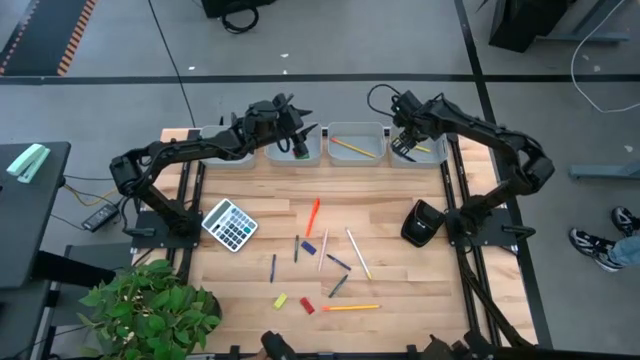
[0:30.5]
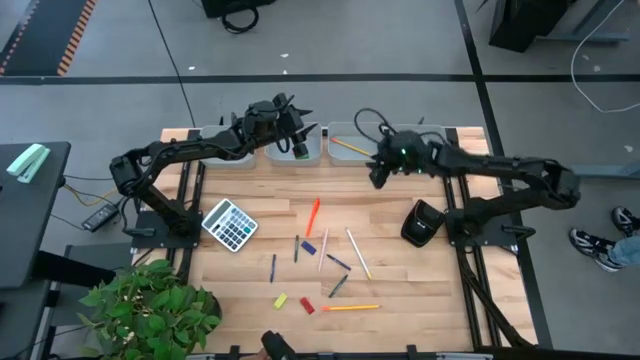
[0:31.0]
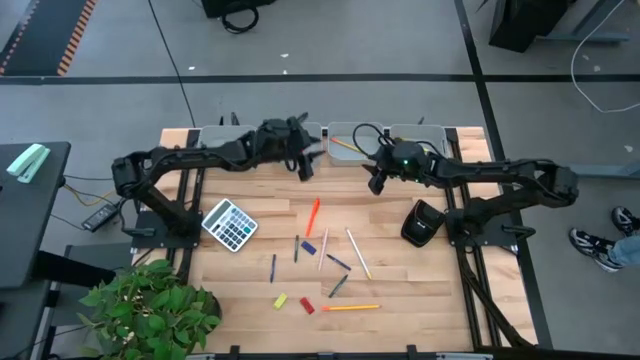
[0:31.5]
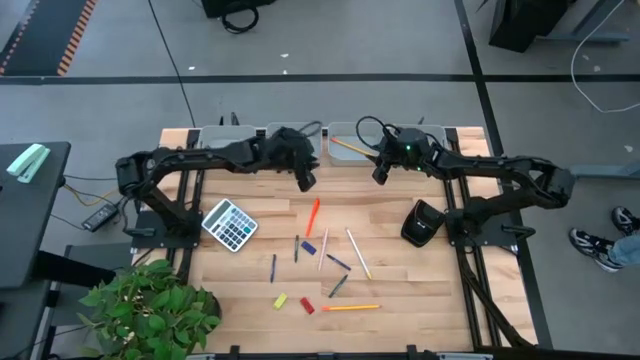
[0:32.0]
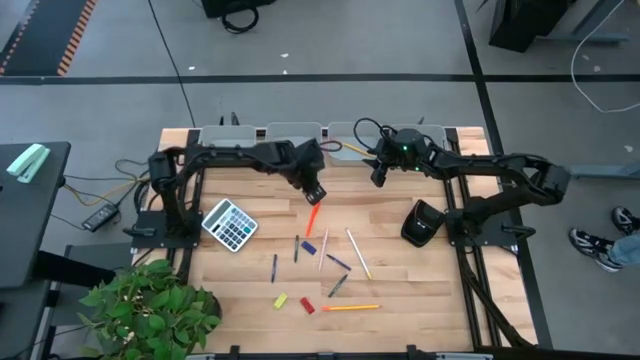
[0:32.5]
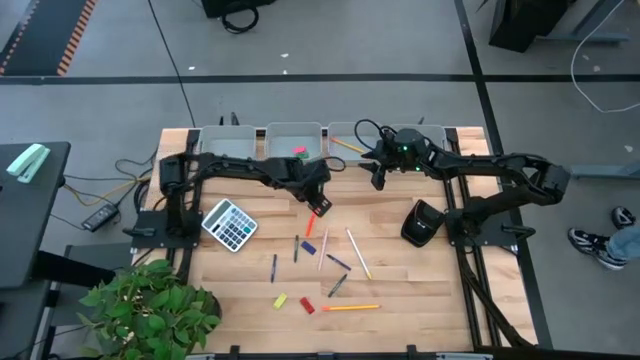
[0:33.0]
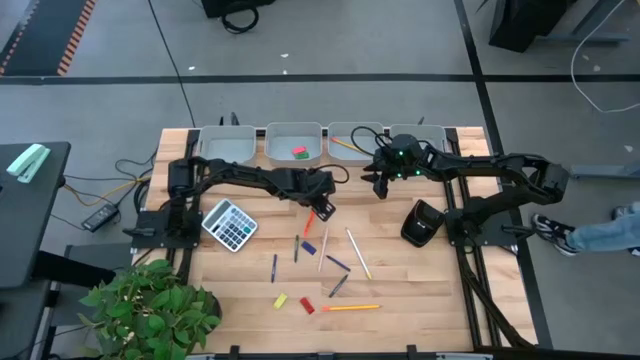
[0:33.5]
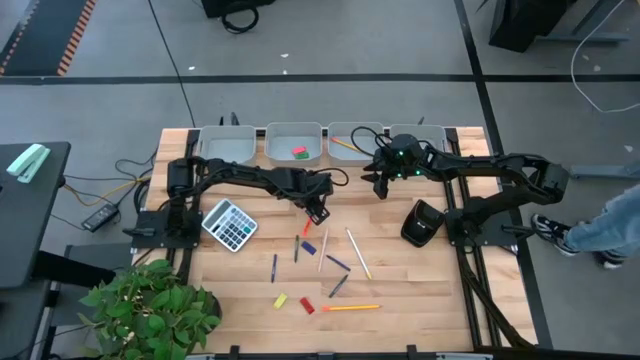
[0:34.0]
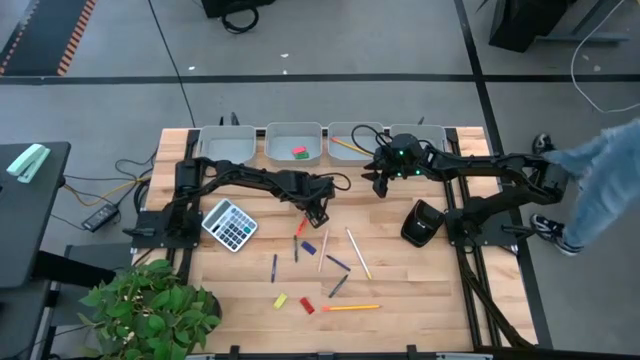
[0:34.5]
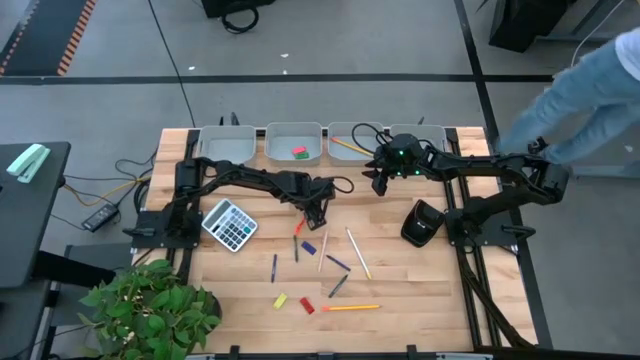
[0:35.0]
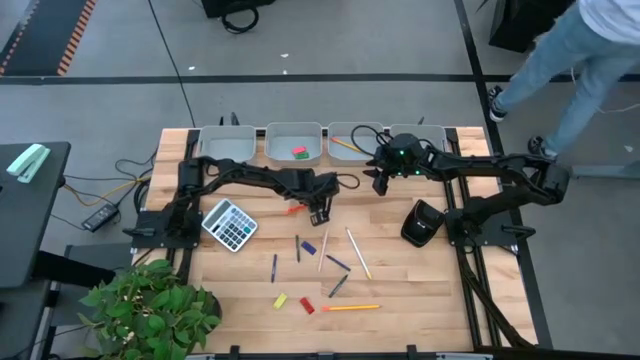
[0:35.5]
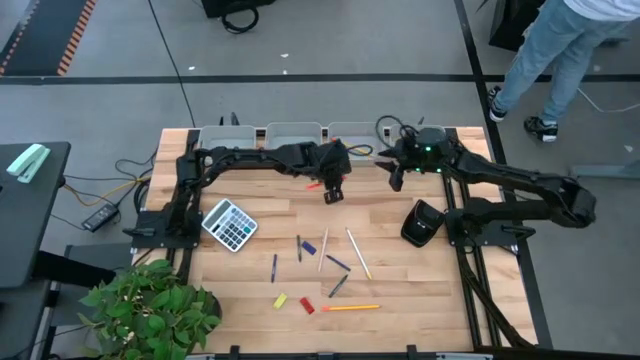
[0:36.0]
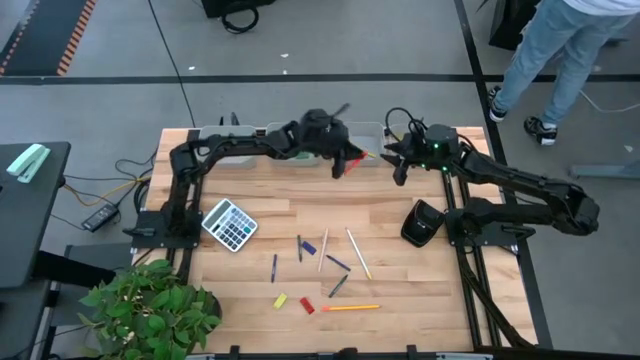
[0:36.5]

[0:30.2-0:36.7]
Task: Sort crayons/erasers/pens/pencils in bins
Put the orange pen into the gray bin

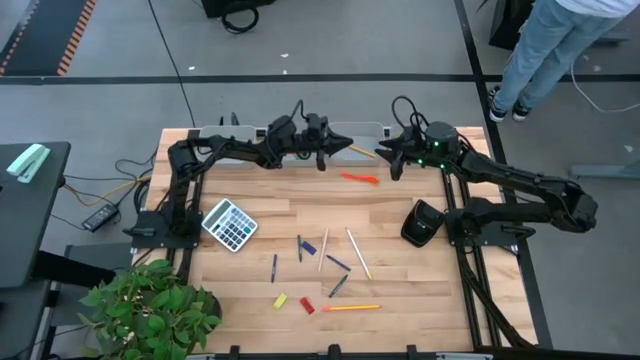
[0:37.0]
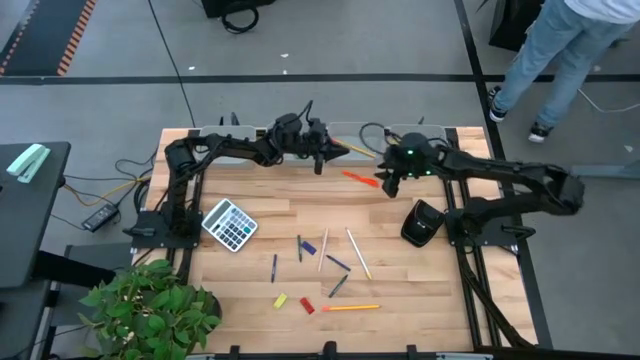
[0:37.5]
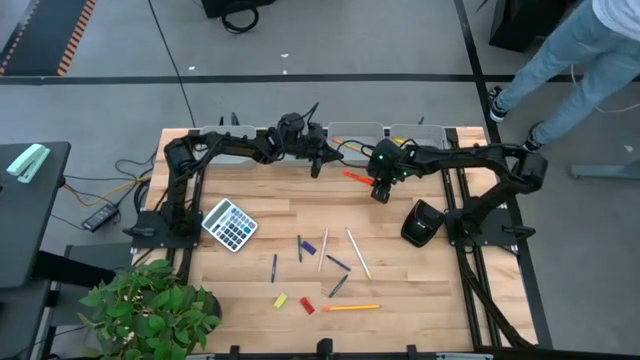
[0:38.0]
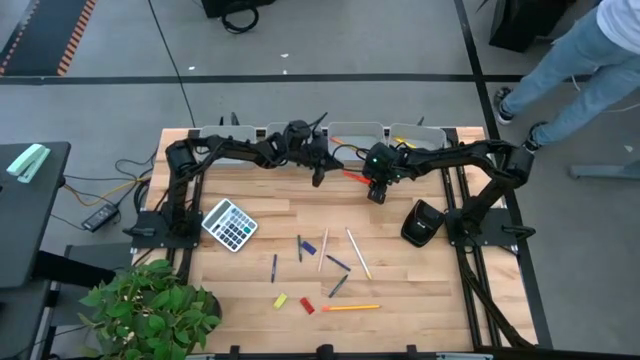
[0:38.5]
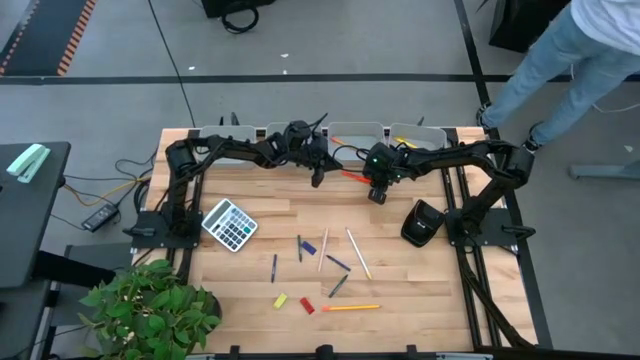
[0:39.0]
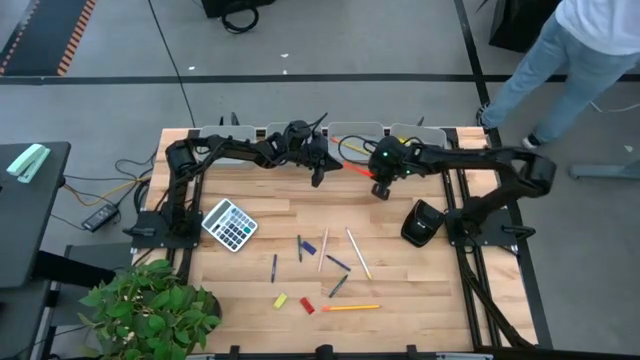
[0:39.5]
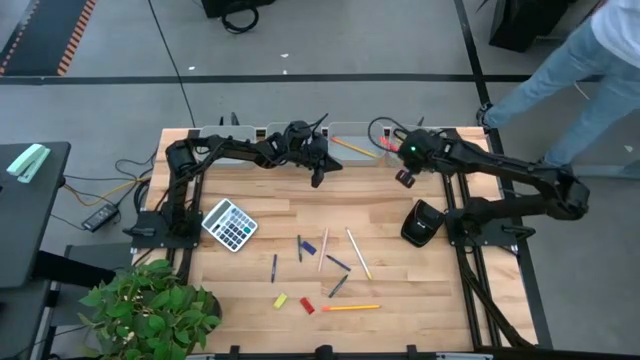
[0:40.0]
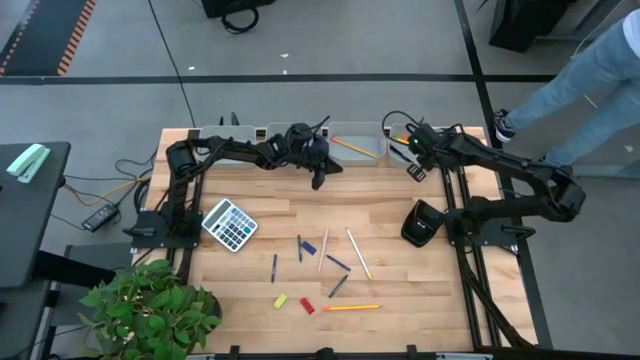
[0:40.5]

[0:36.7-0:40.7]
Put the orange pen into the gray bin

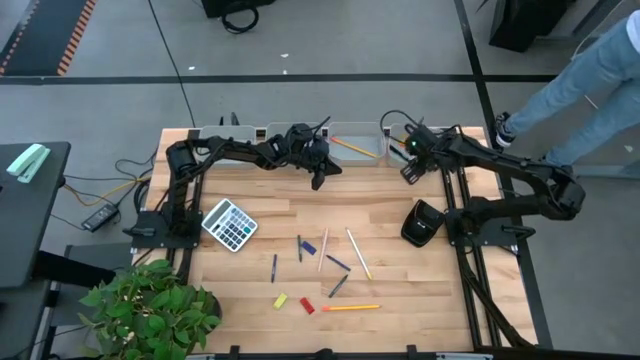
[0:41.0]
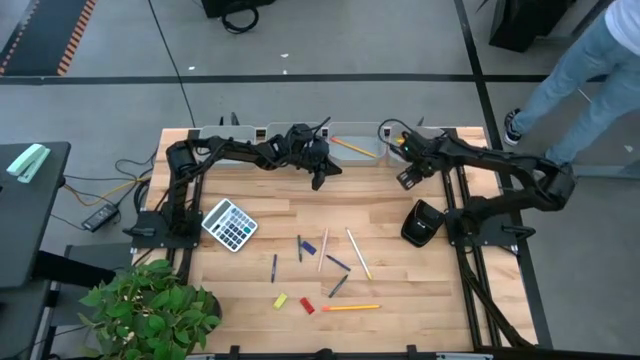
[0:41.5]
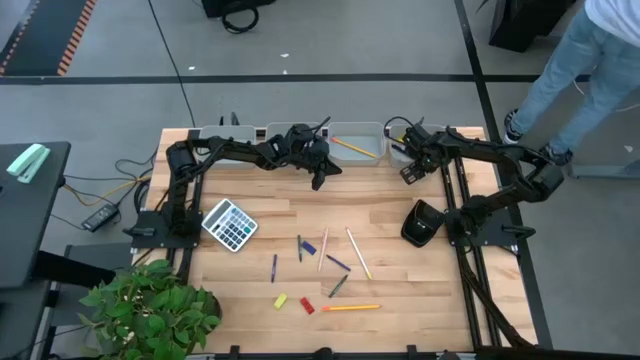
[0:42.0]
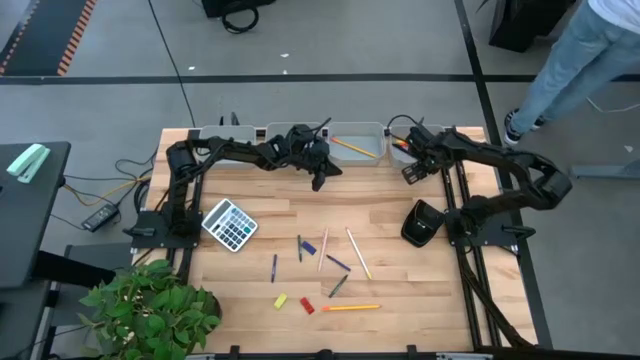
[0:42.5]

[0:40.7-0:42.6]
Adjust the gray bin

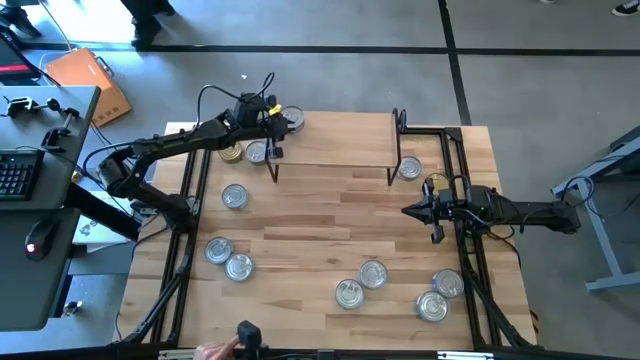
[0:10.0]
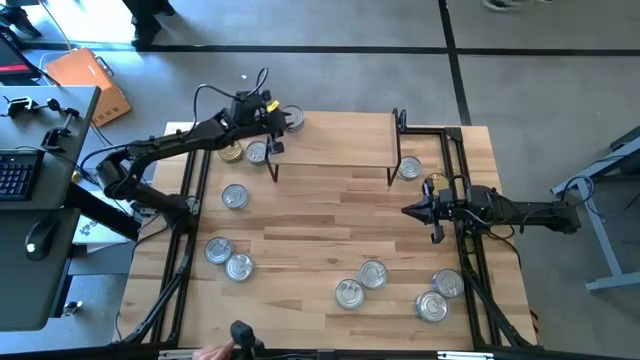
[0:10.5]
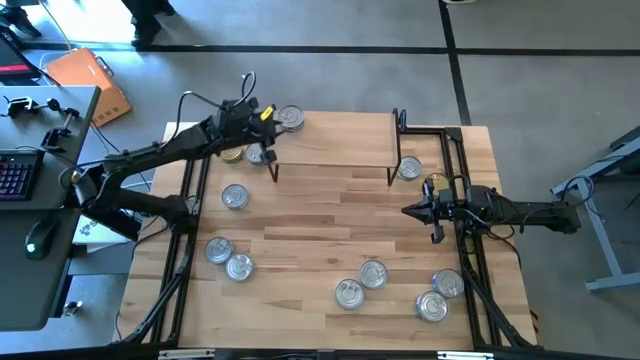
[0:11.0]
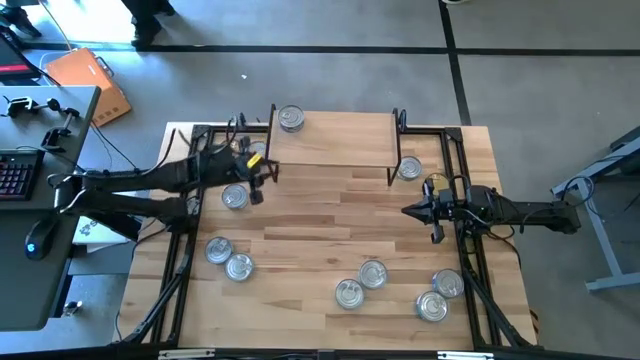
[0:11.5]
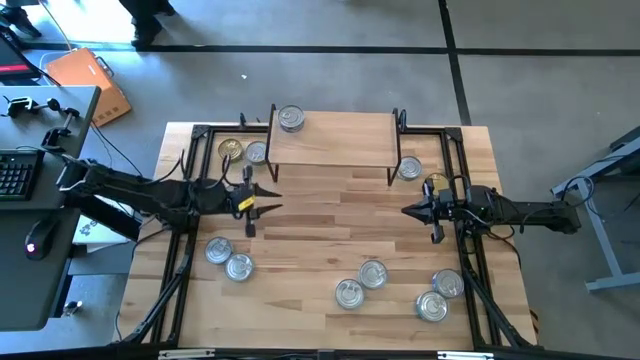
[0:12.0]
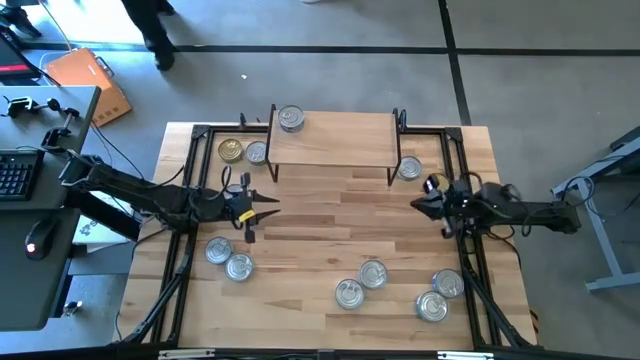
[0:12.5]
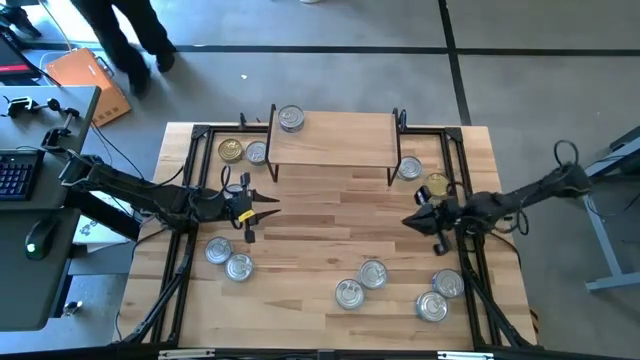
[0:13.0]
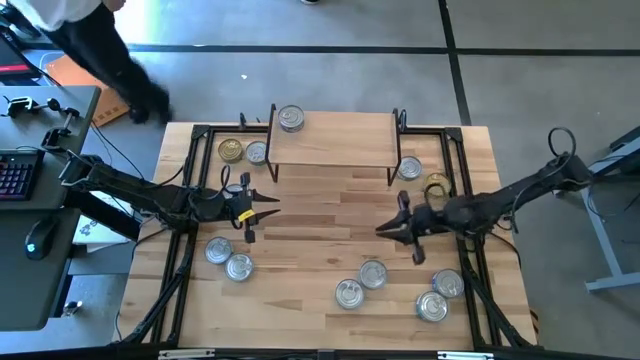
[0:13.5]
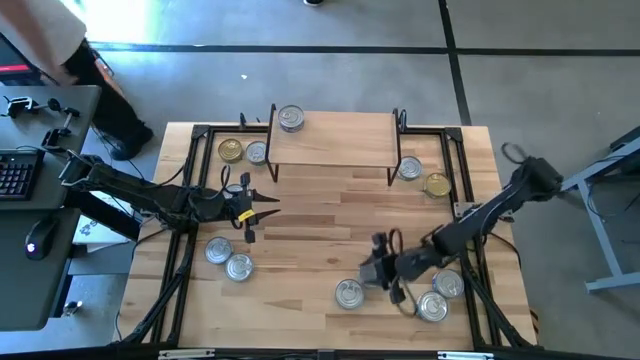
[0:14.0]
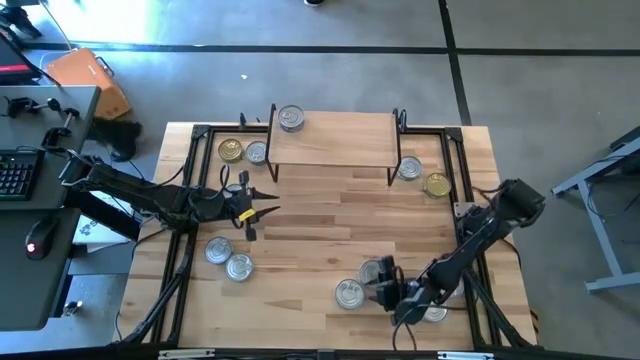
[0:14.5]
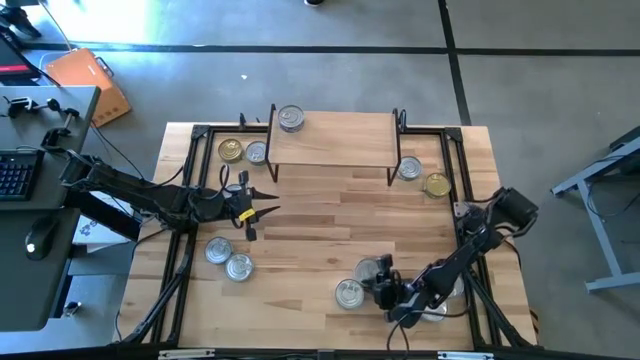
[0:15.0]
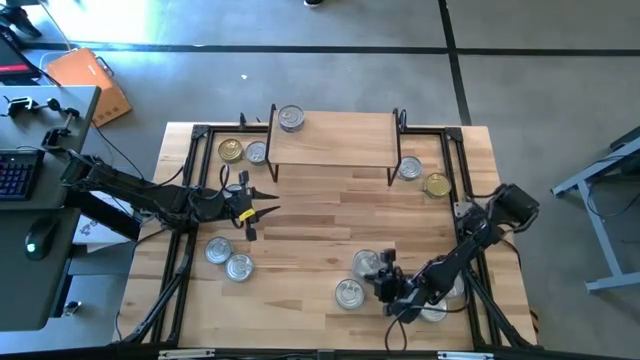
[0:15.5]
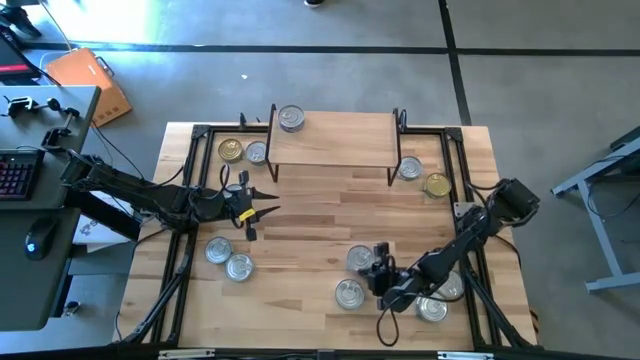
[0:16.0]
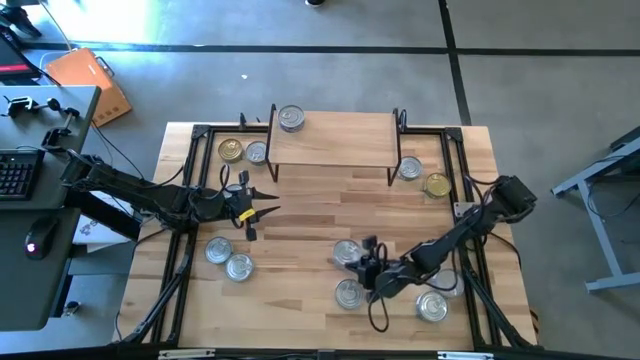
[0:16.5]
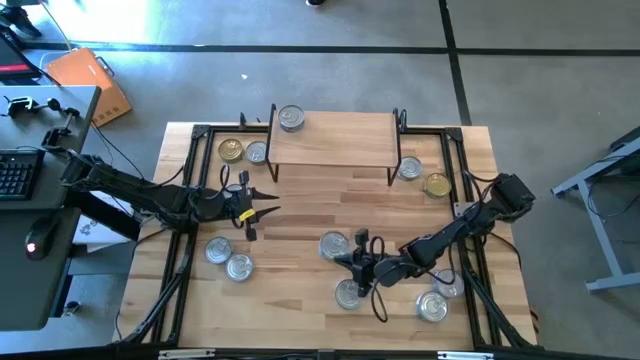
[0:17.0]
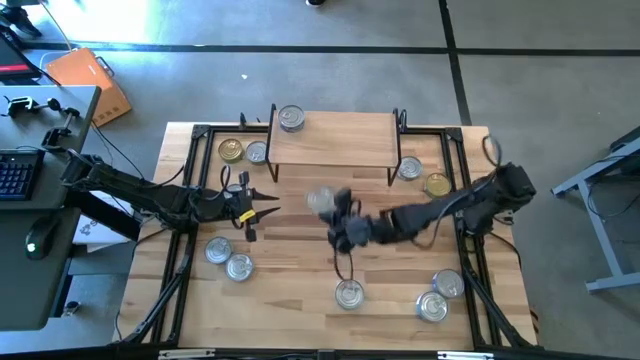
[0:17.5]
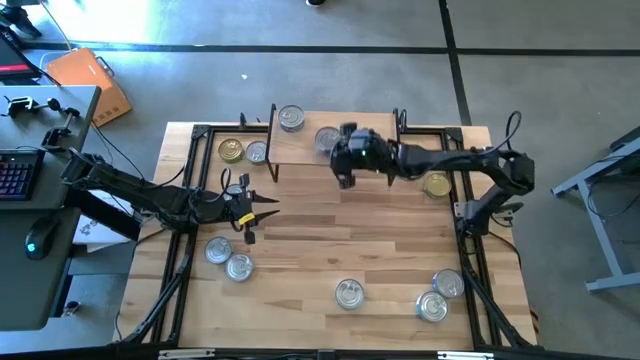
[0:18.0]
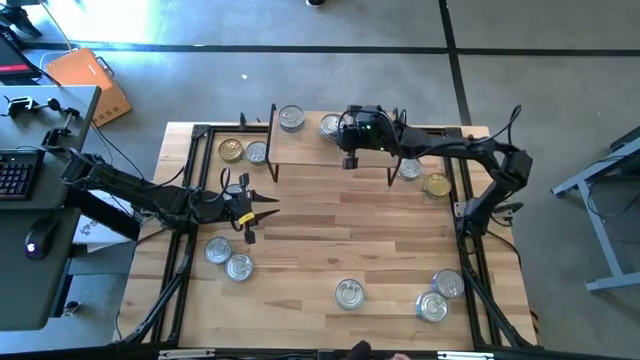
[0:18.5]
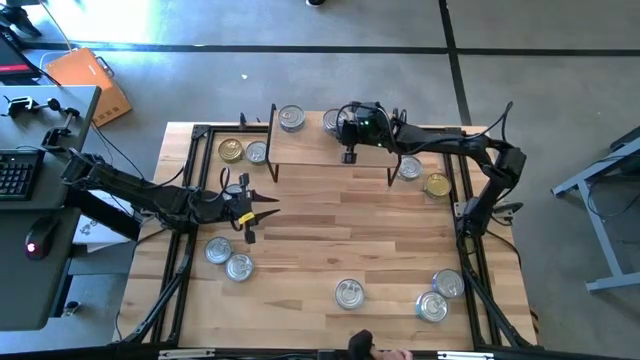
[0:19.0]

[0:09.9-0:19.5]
Task: Stack canned seafood by type on shelf
Put the yellow-blue tuna can on the shelf
